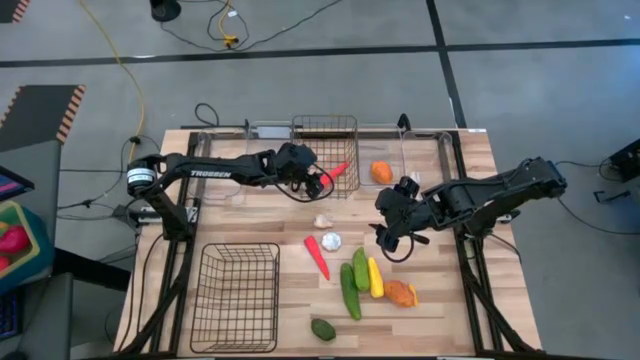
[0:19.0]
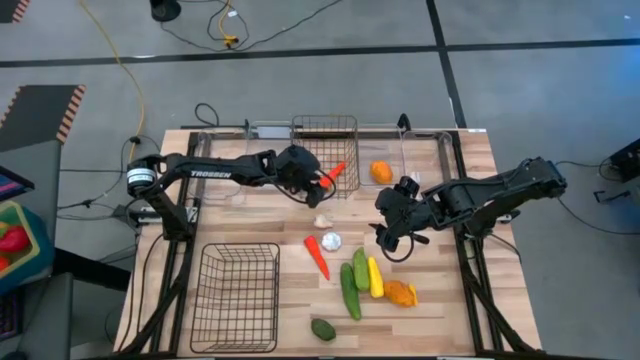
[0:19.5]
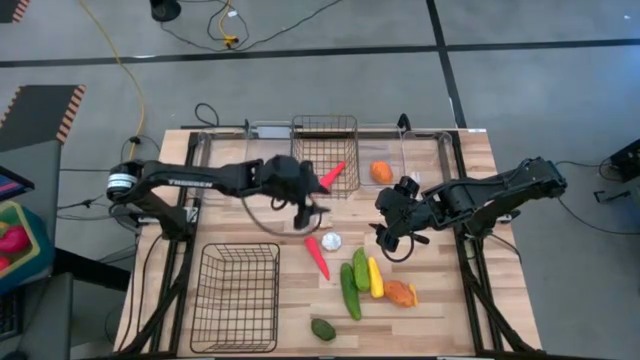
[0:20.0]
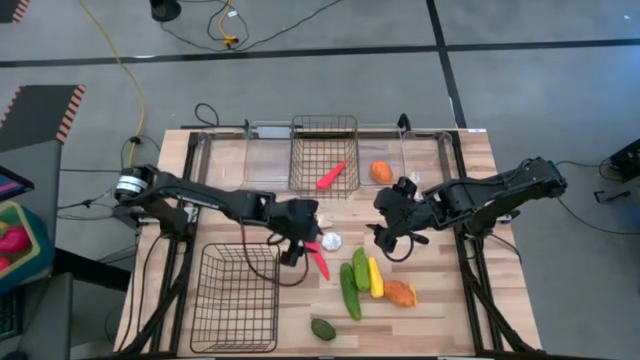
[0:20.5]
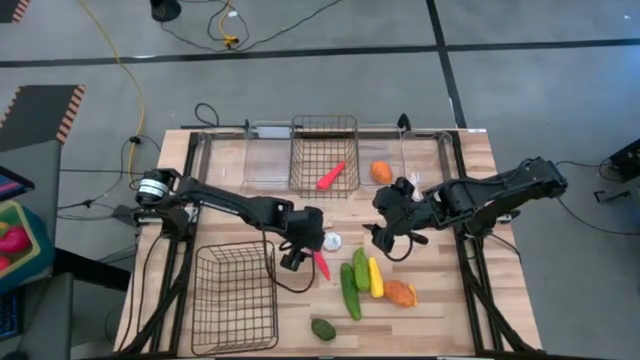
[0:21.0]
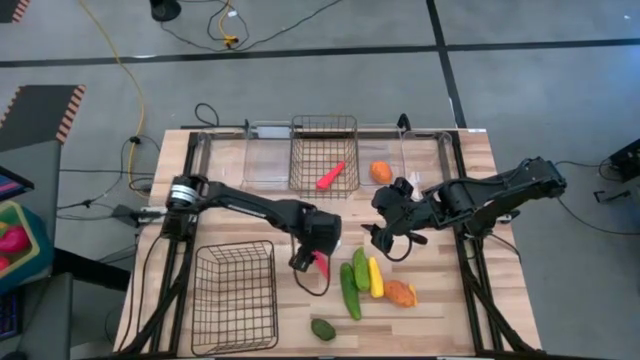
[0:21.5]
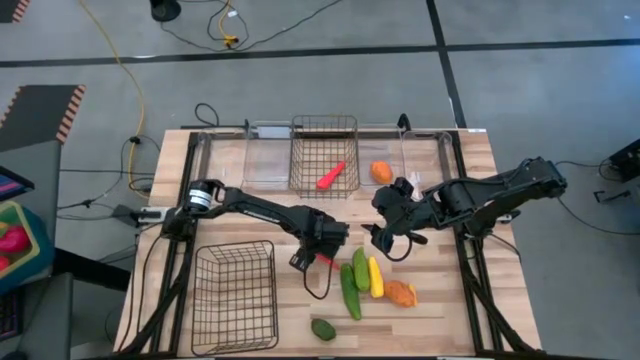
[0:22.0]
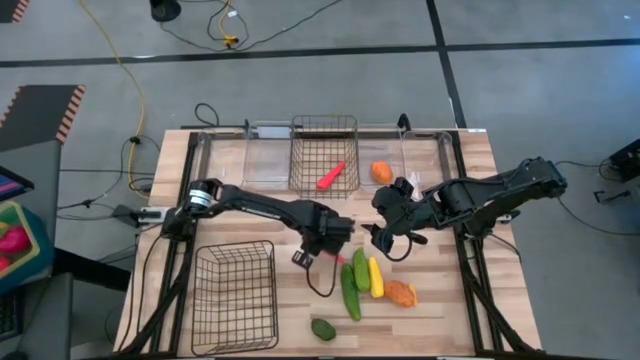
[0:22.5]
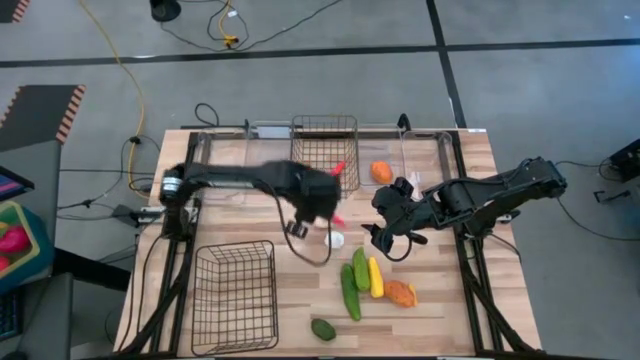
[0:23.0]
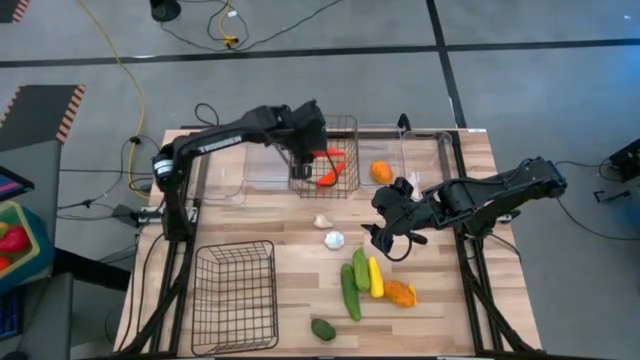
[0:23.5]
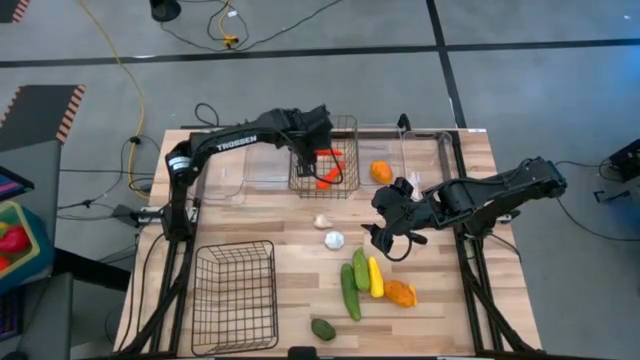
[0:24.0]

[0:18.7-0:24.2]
Task: Sort produce into baskets
Put the orange carrot into the top wire basket

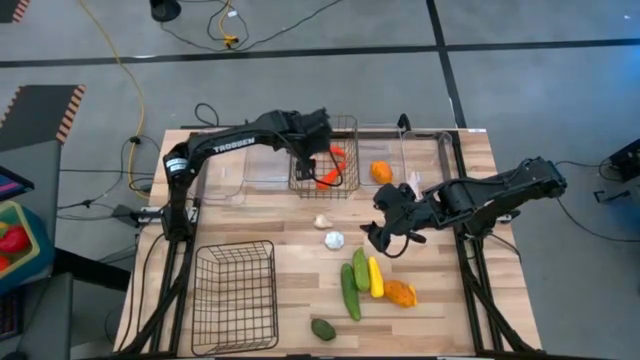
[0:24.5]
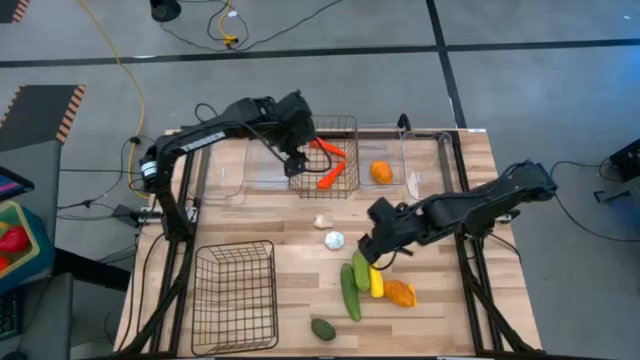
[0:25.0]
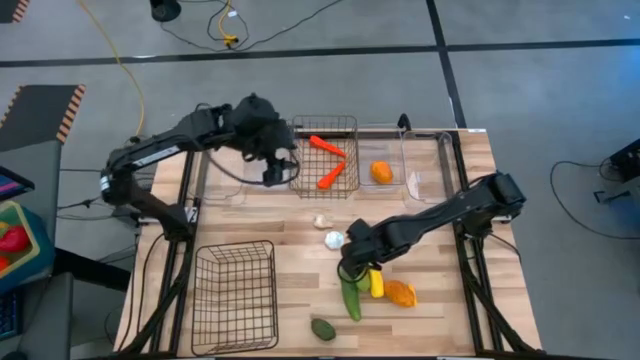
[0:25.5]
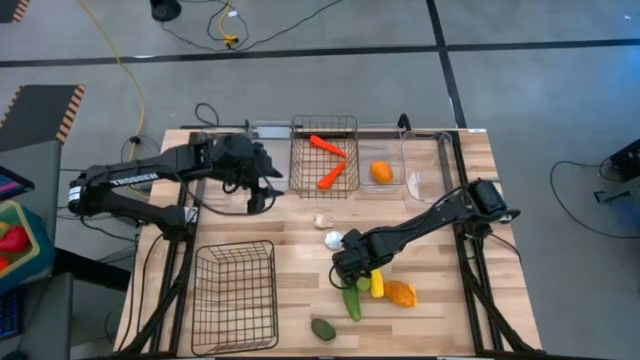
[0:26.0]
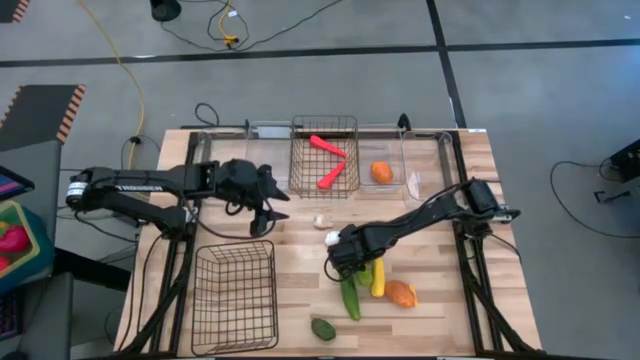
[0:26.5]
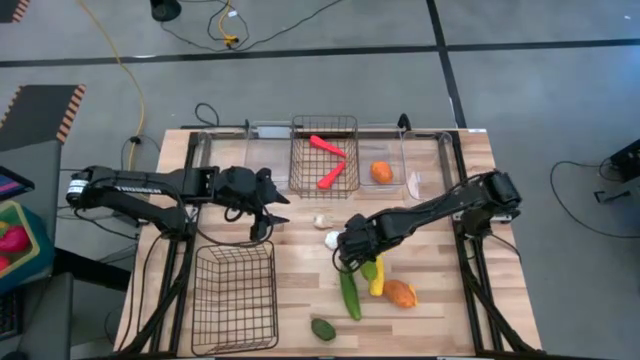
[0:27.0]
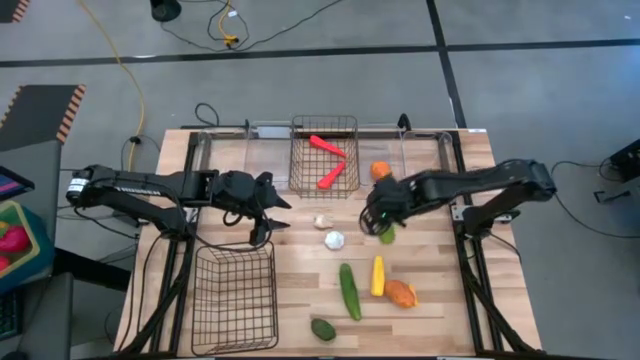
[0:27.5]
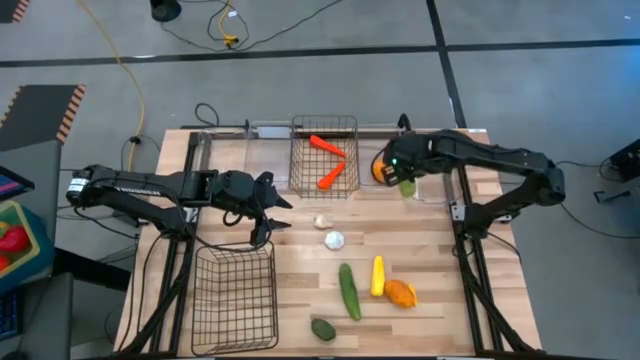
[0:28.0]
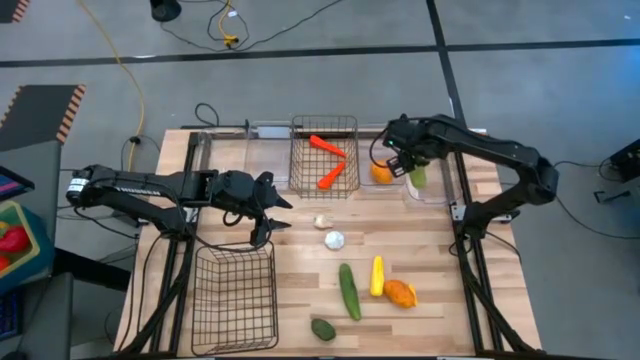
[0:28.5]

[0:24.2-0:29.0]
Put the right green cucumber into the right transparent bin

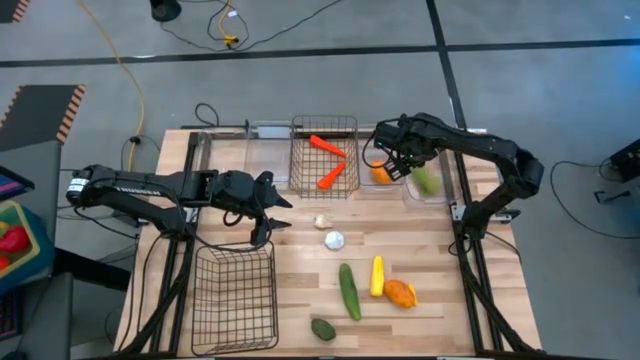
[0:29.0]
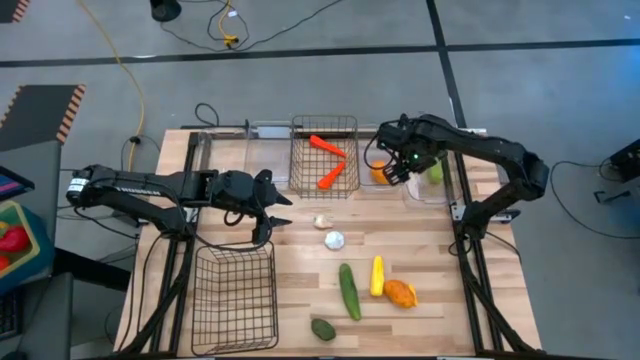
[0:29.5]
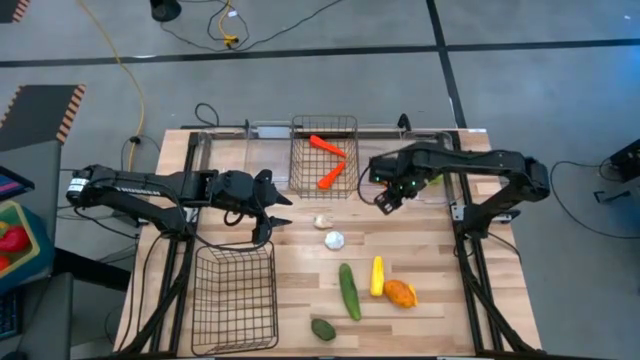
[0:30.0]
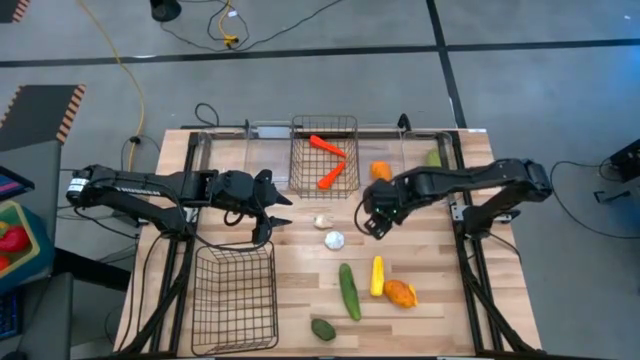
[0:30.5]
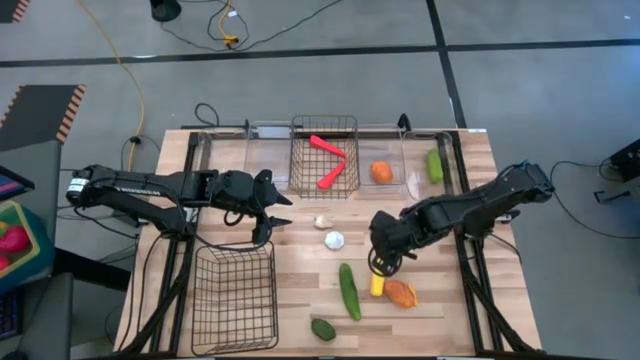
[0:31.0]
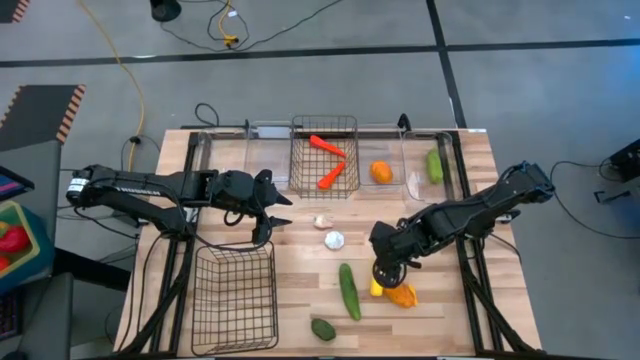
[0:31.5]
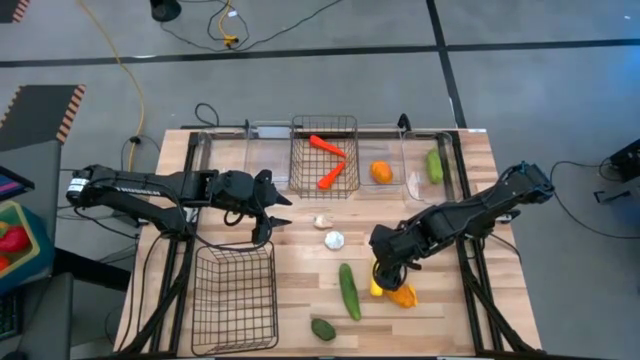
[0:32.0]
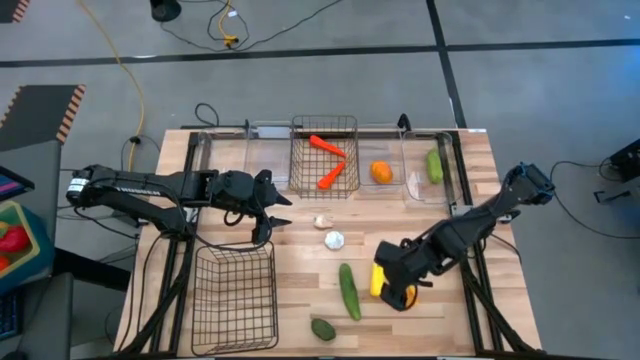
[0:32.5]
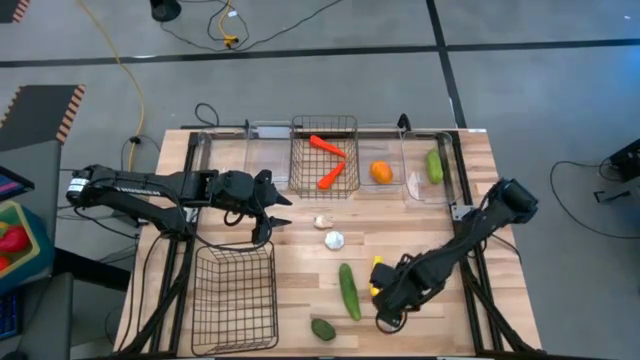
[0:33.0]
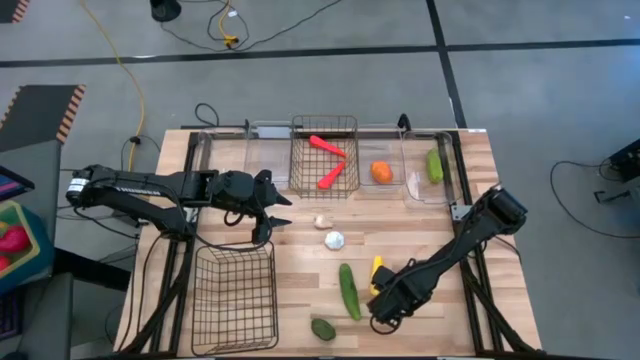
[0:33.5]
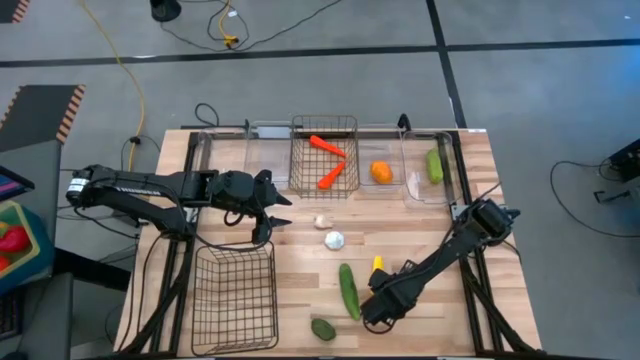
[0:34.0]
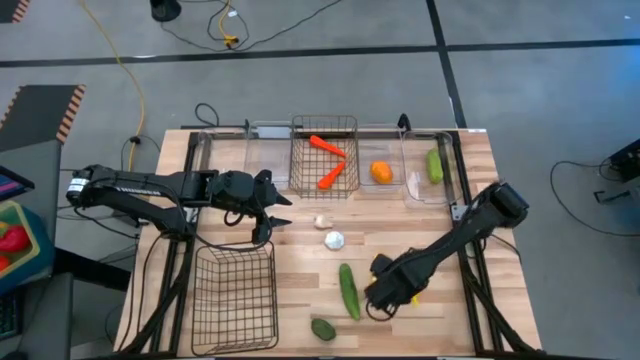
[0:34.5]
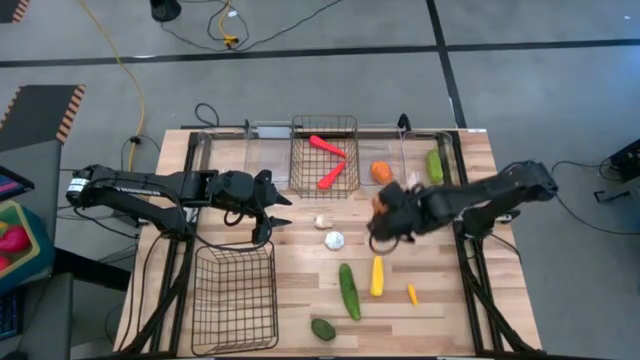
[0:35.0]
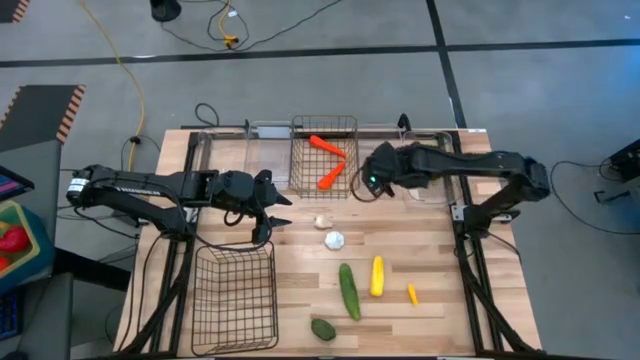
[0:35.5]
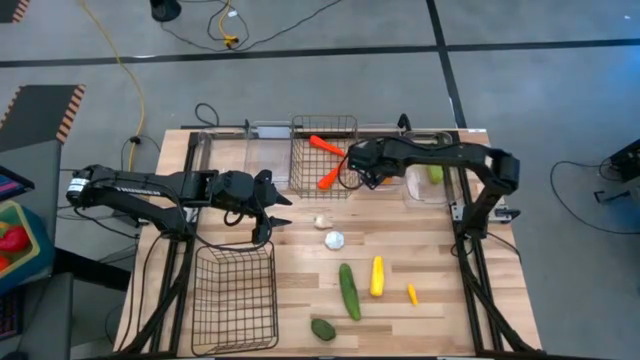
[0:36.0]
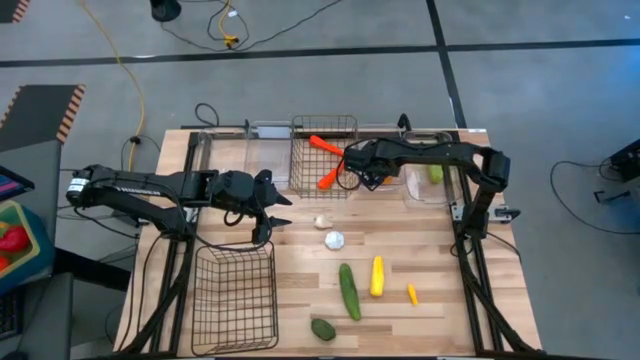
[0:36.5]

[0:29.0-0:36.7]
Put the yellow mango into the middle right transparent bin

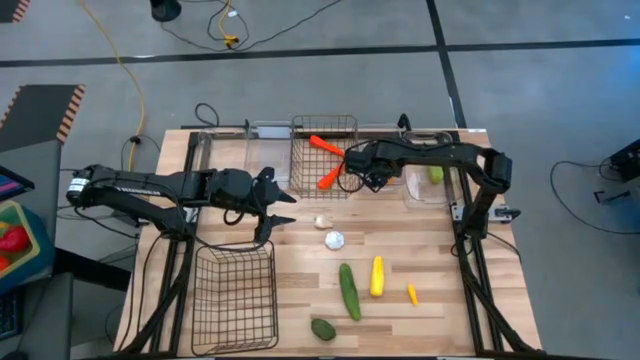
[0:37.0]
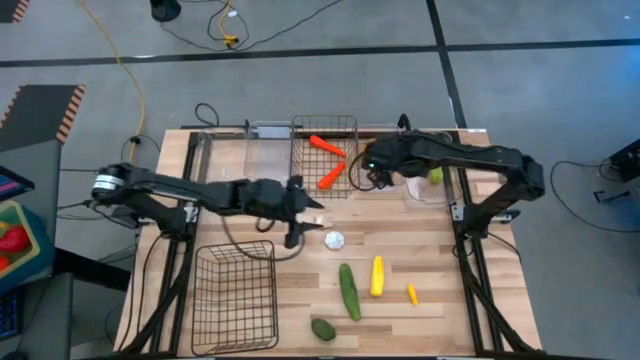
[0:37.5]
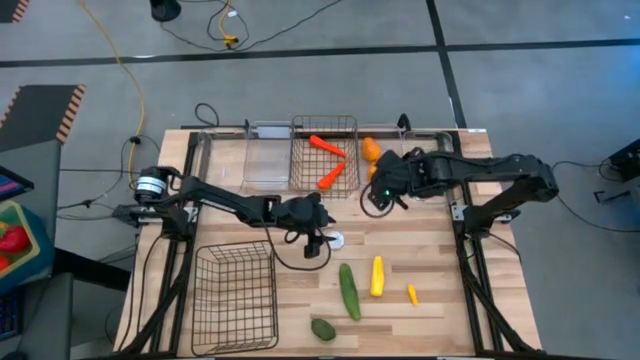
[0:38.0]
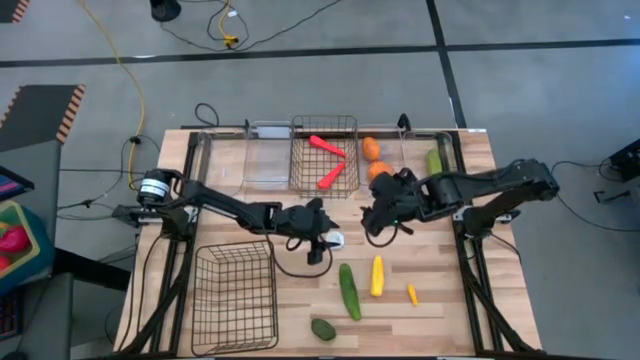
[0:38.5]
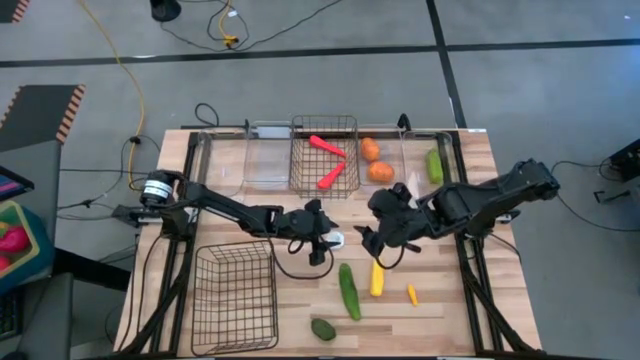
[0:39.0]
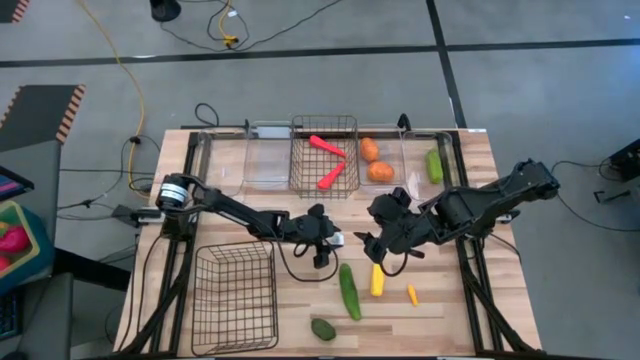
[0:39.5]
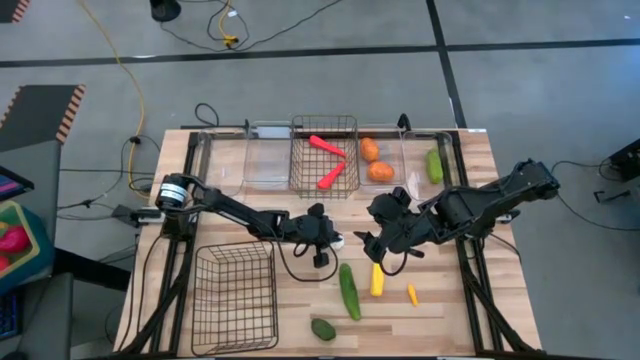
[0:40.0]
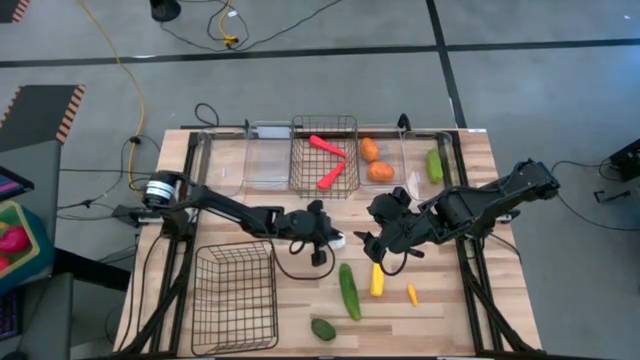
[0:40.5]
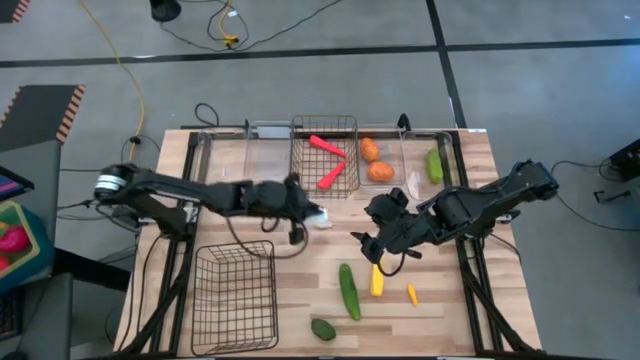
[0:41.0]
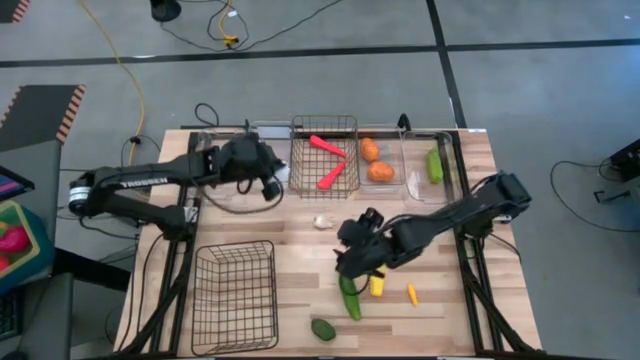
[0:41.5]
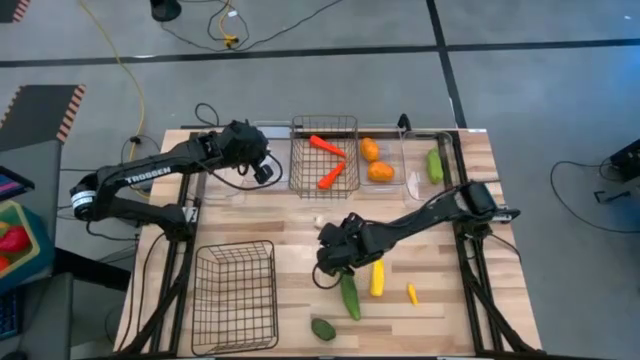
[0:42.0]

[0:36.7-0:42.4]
Put the bottom white garlic into the middle left transparent bin
